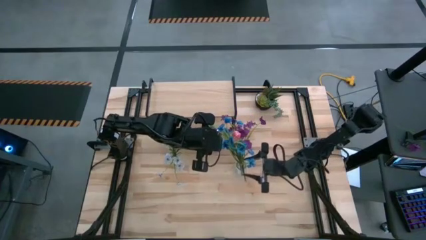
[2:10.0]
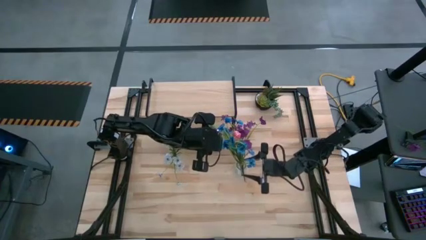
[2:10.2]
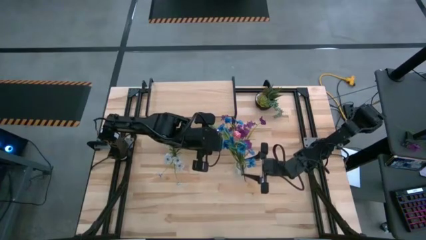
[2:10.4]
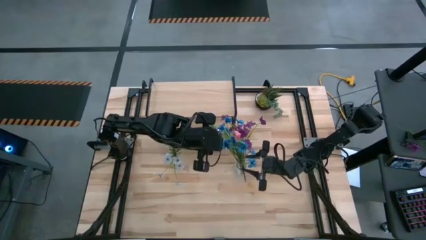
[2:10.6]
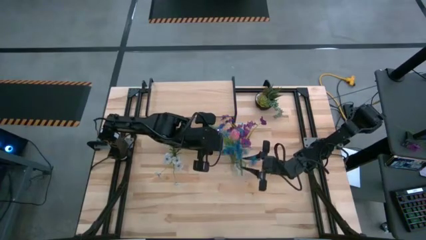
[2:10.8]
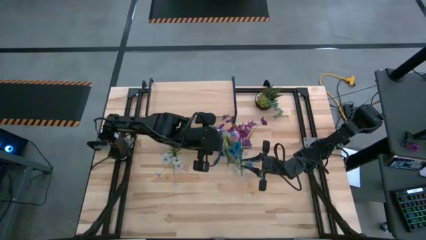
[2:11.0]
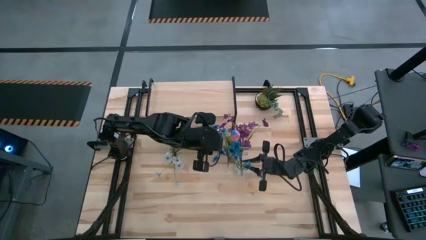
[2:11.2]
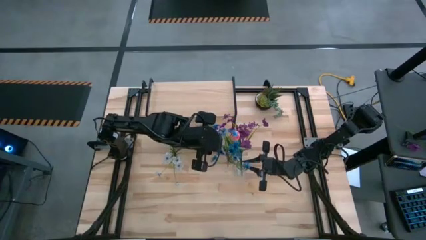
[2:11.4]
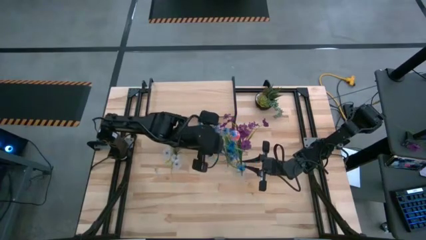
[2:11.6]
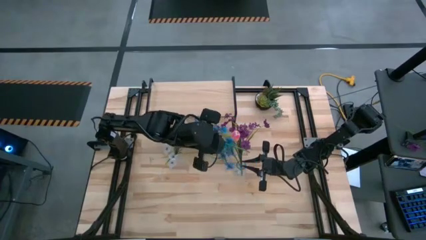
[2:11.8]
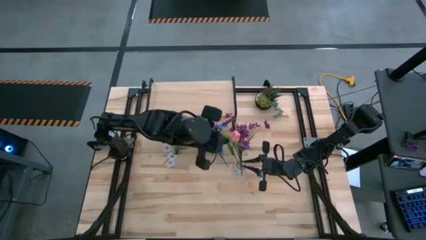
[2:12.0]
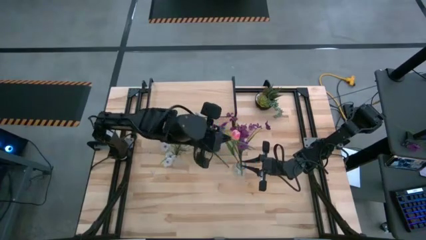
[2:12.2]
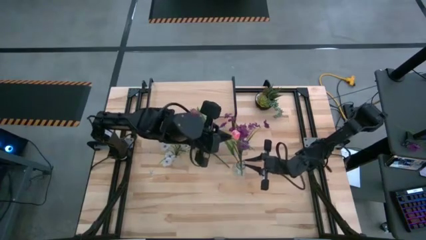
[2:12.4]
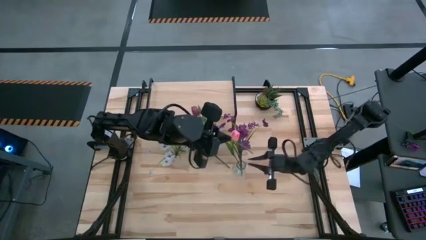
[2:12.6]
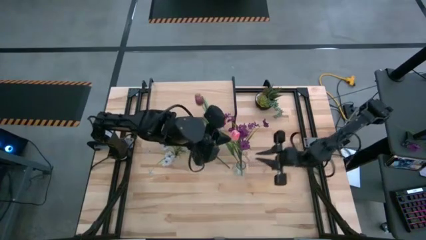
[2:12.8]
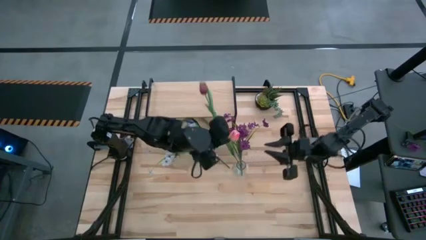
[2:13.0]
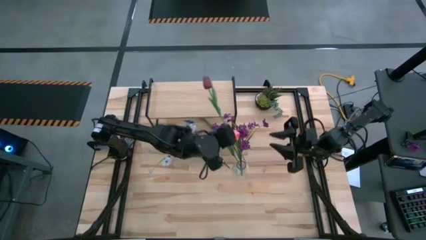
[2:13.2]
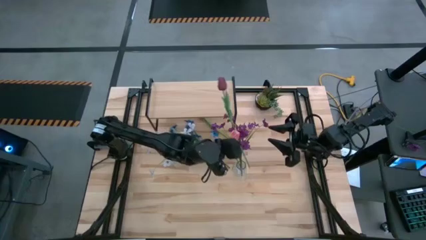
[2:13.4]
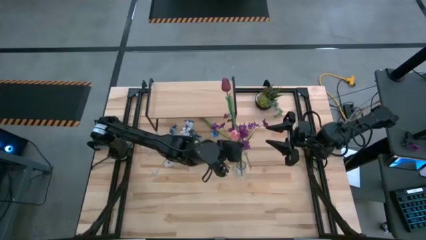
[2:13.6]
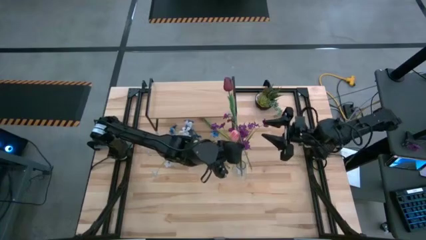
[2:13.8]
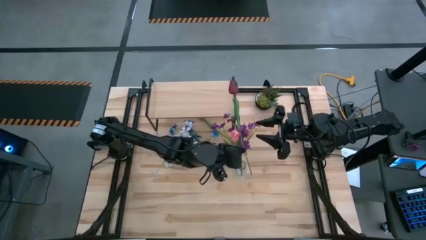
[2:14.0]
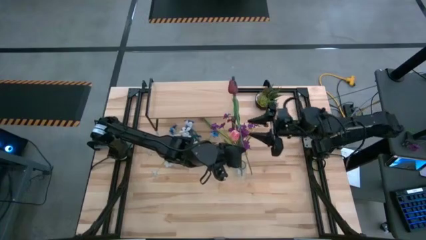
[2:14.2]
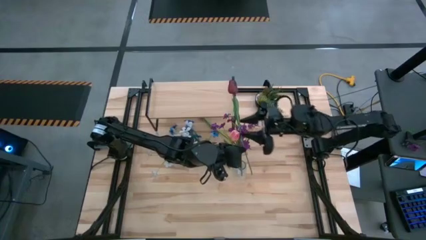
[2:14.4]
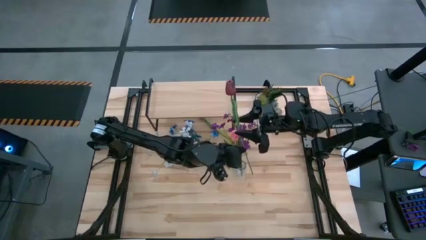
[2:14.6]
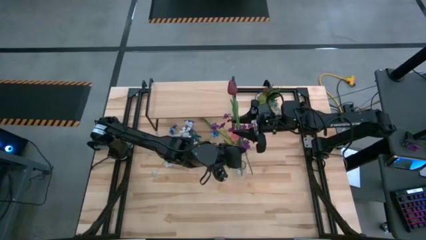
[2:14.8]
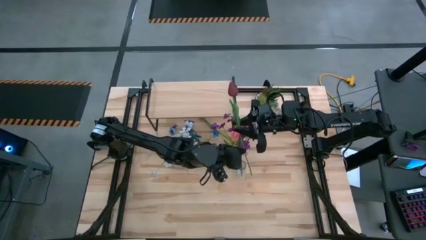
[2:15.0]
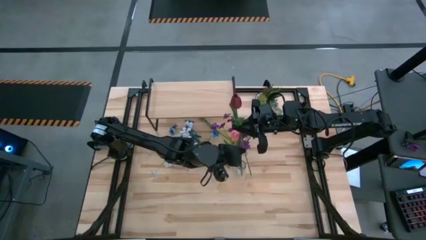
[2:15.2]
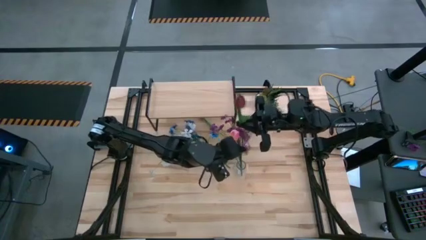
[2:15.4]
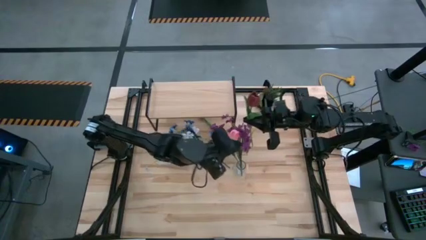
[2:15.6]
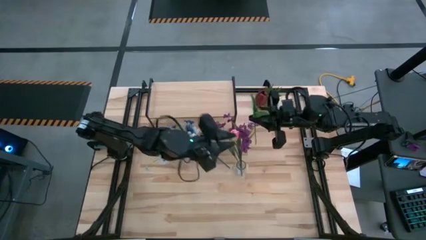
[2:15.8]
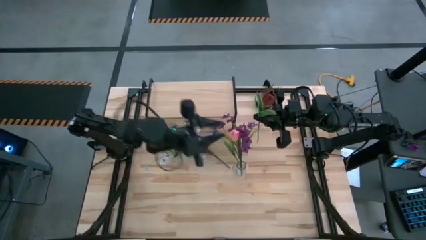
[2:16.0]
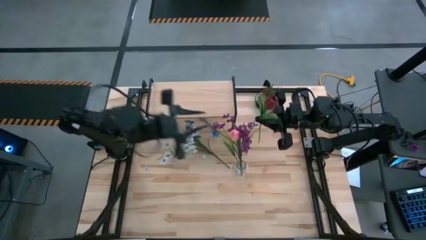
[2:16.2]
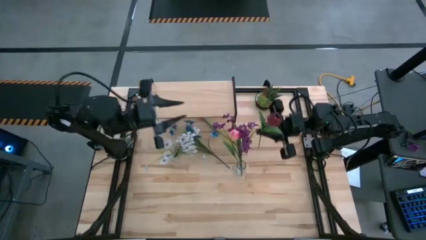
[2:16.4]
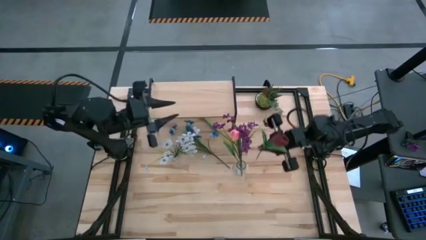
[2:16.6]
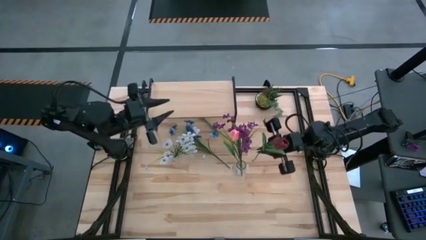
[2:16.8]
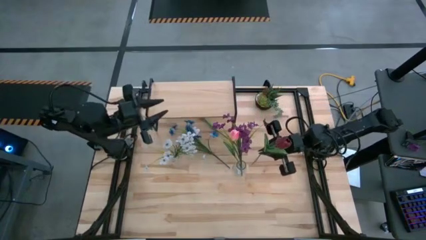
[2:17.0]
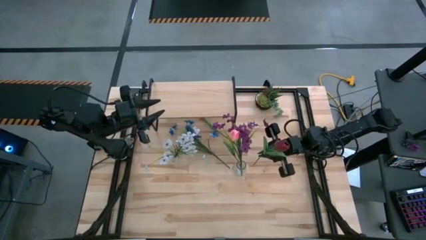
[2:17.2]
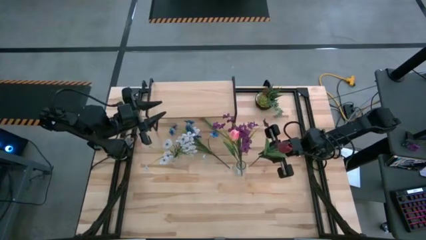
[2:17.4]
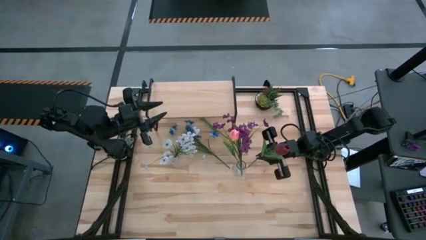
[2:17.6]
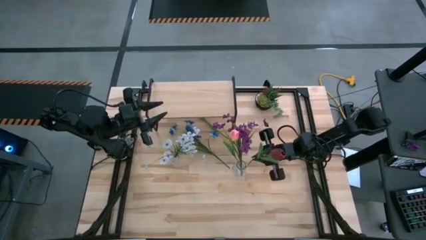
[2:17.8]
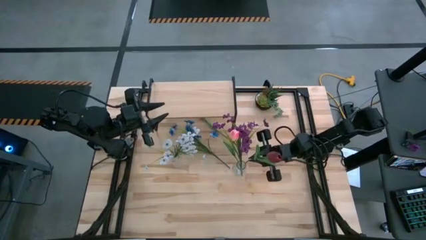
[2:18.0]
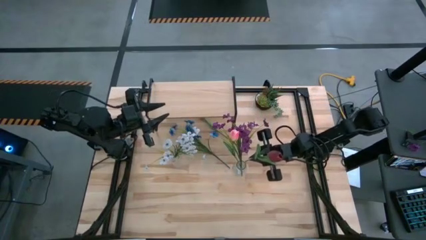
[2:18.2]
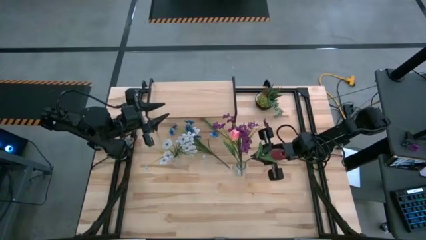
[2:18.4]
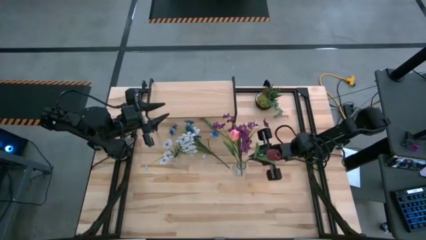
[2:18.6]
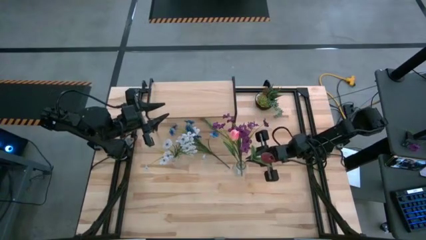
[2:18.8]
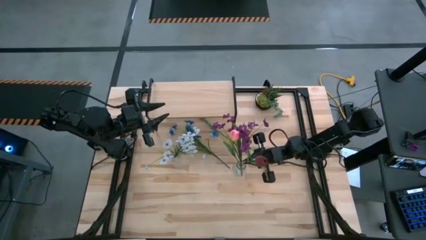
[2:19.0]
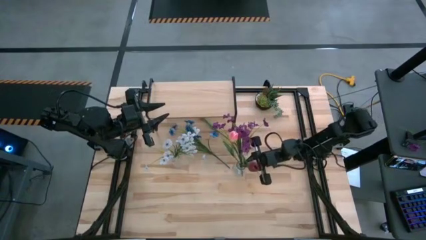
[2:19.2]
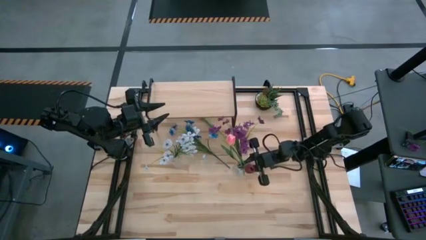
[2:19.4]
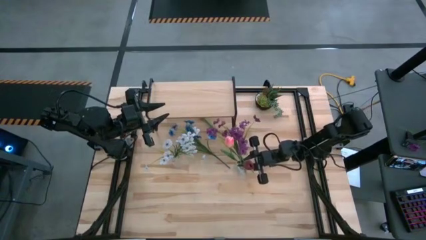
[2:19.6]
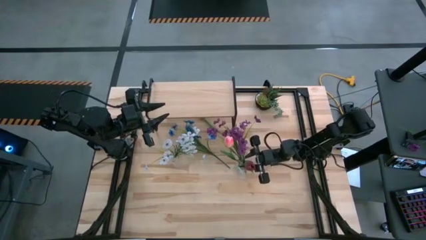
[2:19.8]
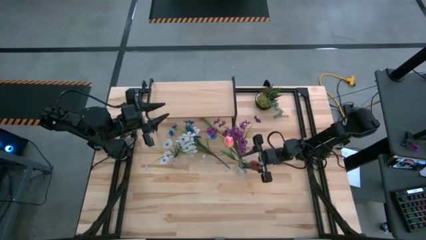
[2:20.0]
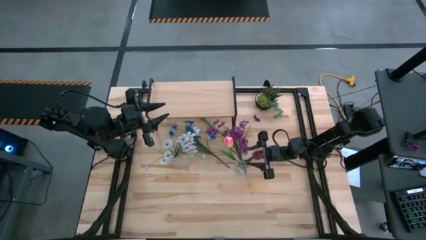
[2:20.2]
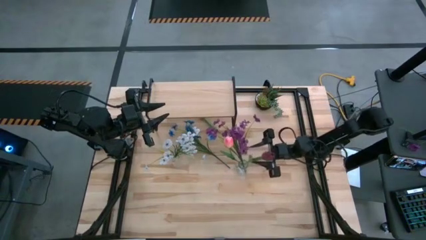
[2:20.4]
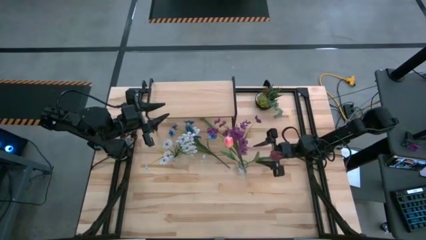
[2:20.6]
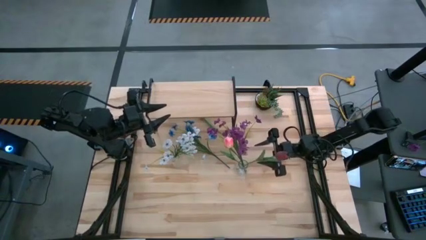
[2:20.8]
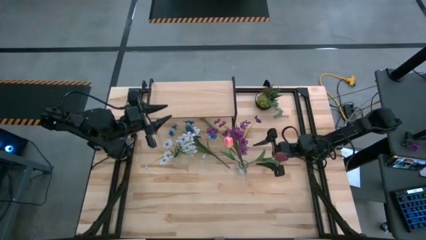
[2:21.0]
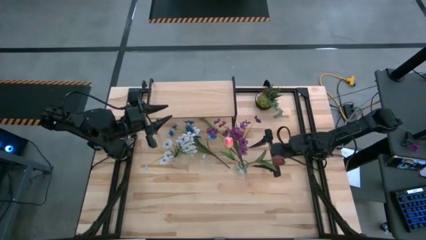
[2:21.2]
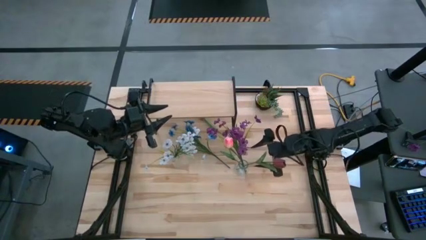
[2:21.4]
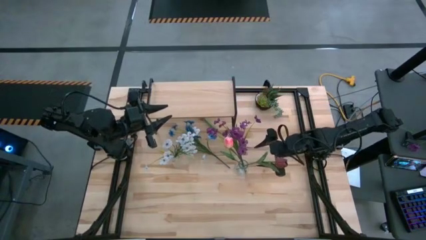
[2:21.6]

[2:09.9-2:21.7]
Task: Pick and place flowers into a vace then onto a shelf
Put the red flower into the right transparent vase

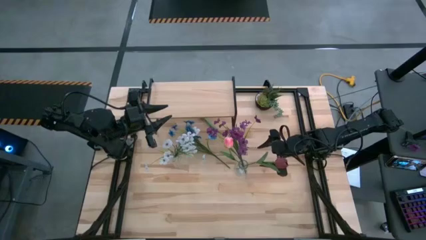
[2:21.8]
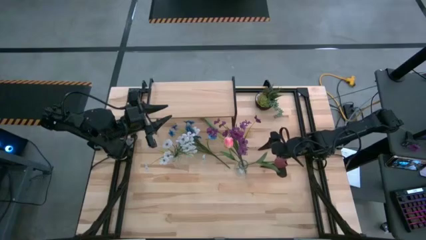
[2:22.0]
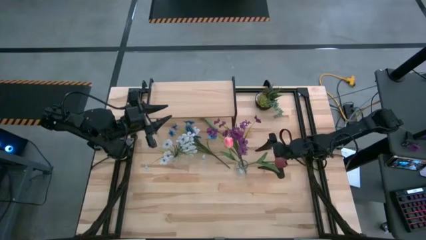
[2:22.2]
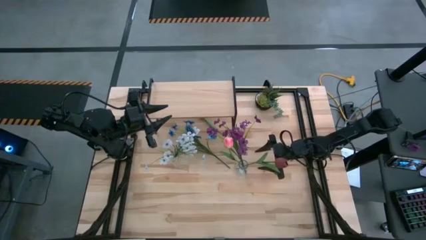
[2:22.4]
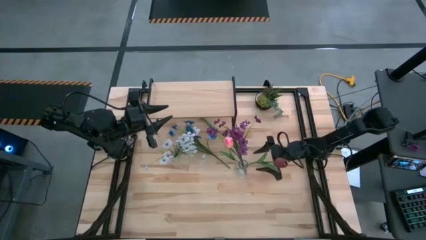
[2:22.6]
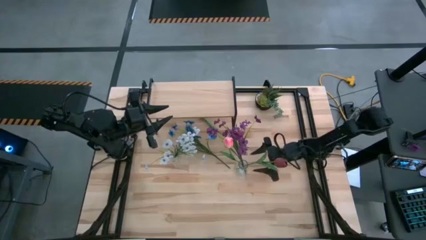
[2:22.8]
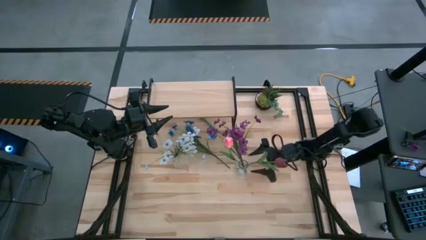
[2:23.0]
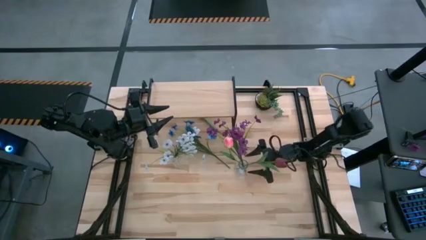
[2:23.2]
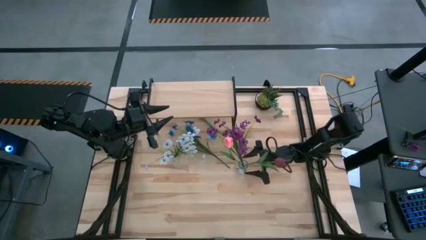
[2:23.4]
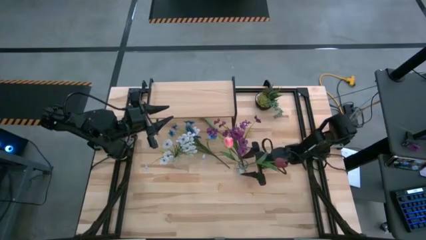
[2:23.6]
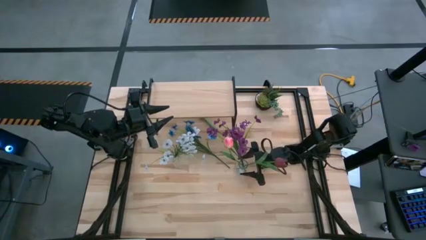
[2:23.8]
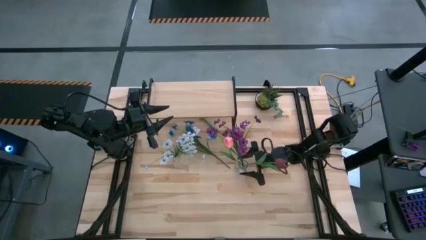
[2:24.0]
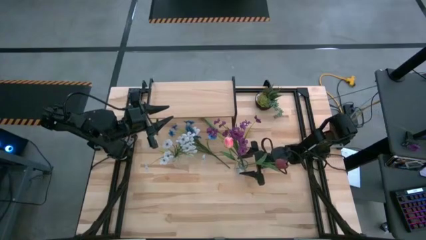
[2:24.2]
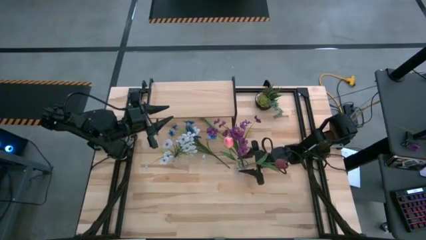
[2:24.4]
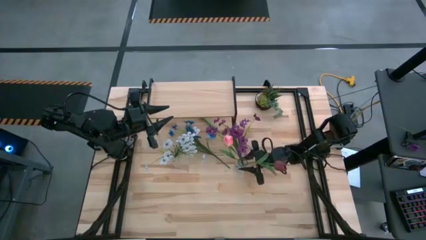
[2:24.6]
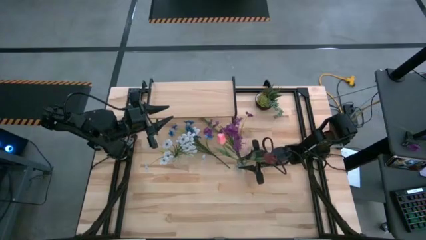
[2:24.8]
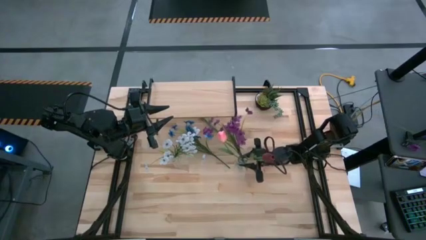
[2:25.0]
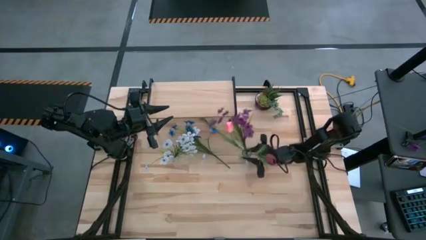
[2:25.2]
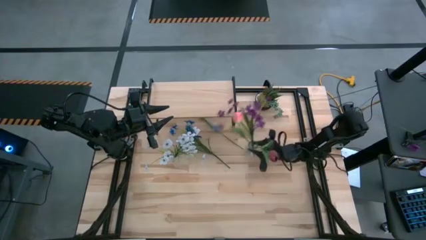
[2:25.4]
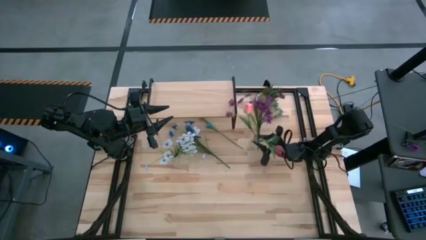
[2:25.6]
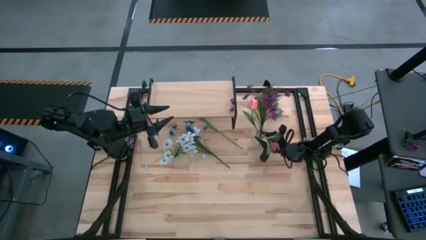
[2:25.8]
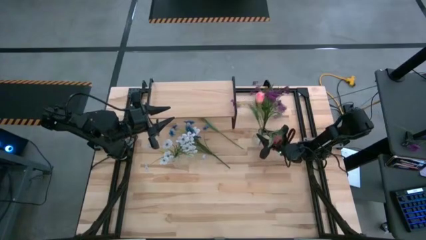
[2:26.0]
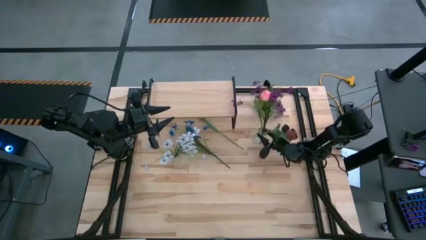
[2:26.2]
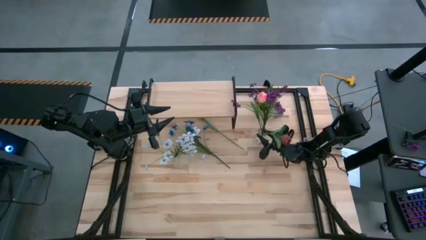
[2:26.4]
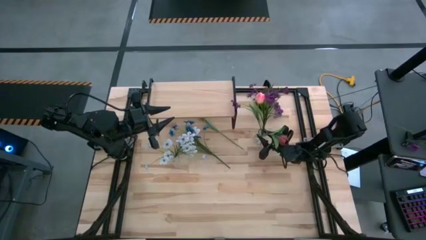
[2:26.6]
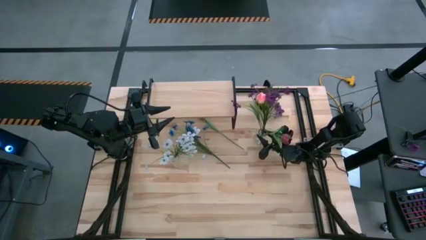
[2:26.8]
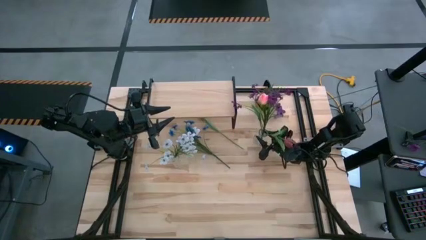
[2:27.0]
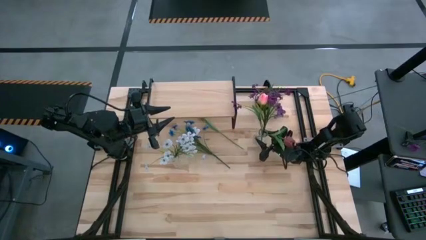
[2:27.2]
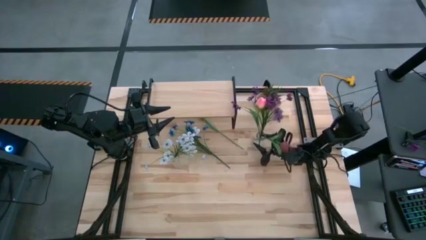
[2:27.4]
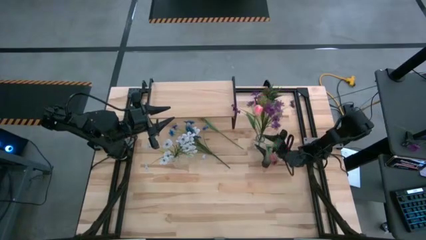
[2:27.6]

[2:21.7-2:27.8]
Adjust the right transparent vase
